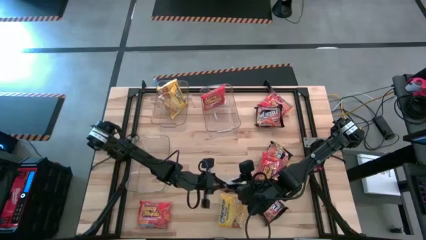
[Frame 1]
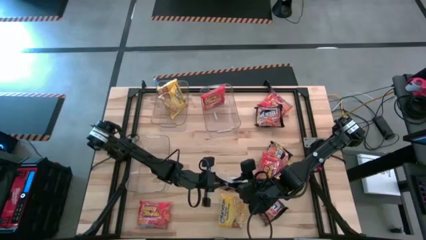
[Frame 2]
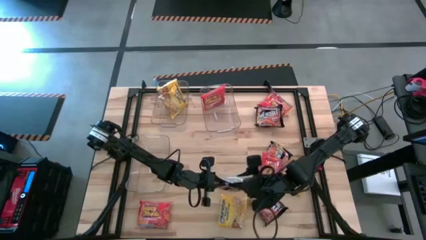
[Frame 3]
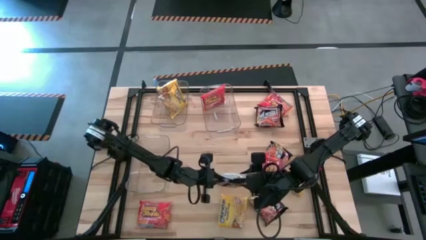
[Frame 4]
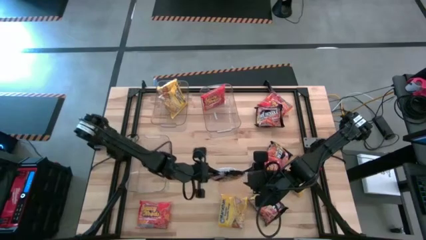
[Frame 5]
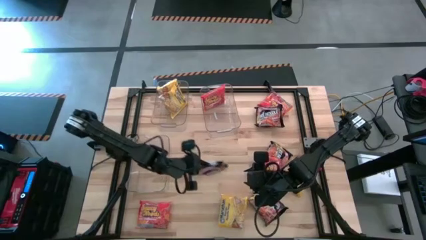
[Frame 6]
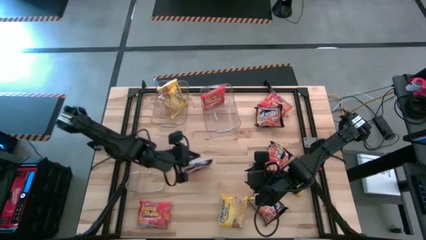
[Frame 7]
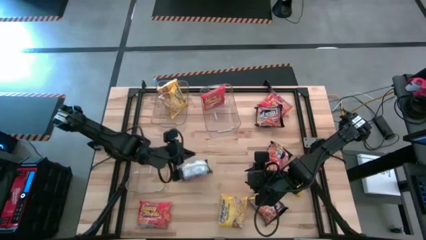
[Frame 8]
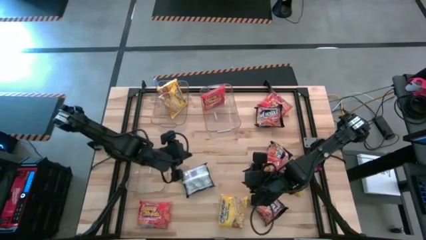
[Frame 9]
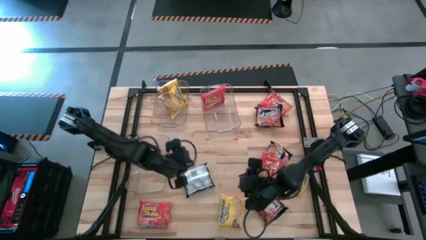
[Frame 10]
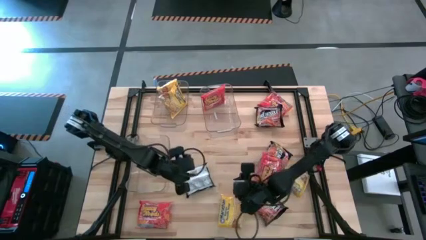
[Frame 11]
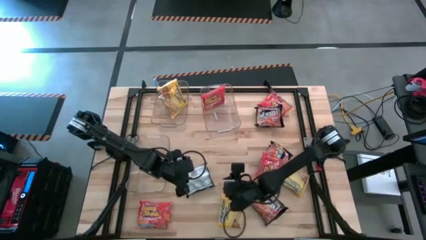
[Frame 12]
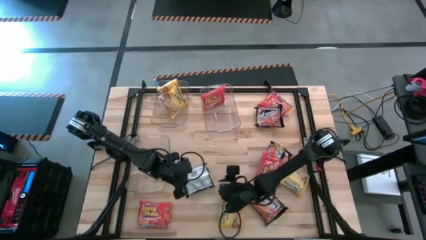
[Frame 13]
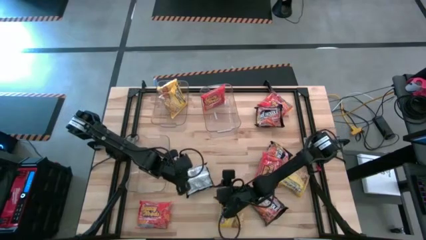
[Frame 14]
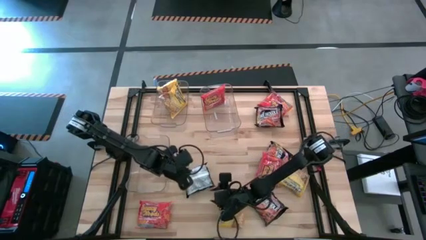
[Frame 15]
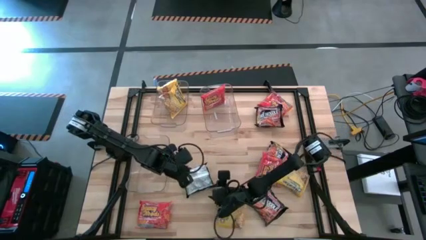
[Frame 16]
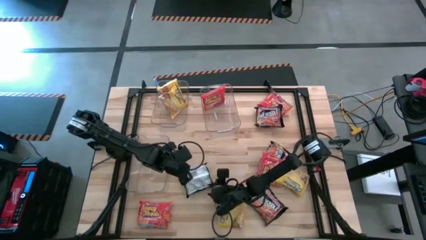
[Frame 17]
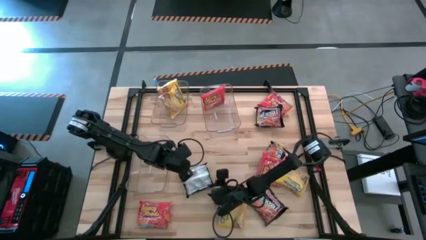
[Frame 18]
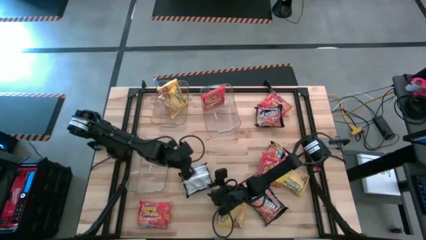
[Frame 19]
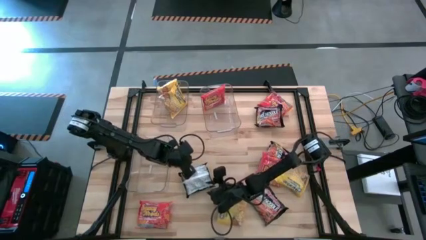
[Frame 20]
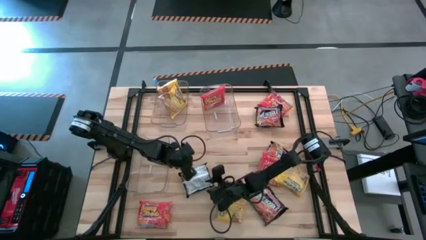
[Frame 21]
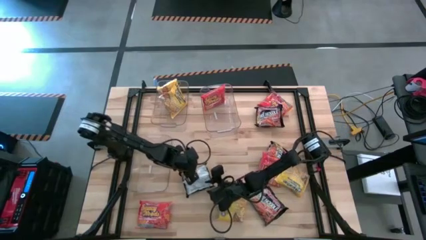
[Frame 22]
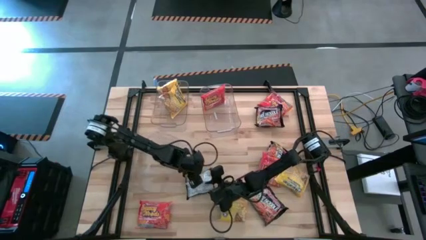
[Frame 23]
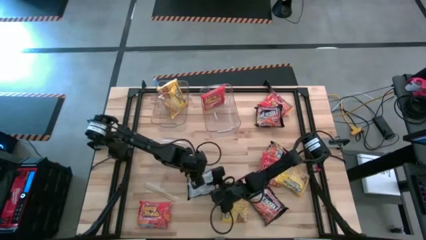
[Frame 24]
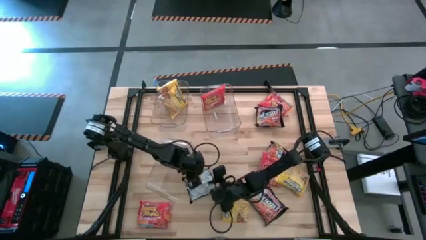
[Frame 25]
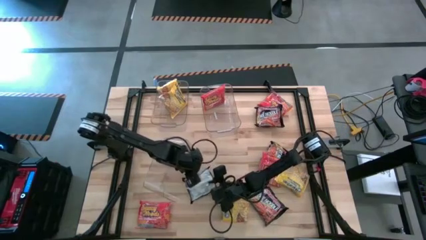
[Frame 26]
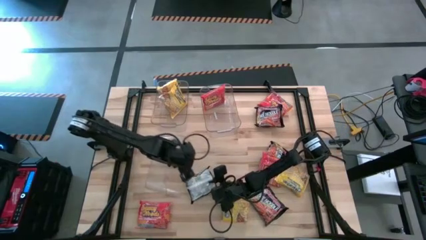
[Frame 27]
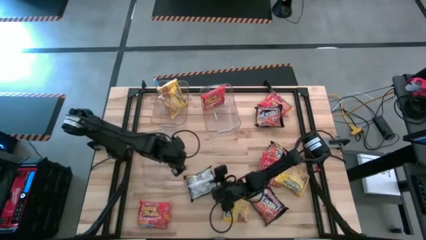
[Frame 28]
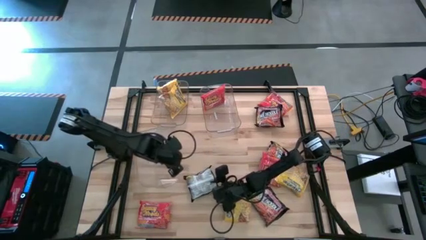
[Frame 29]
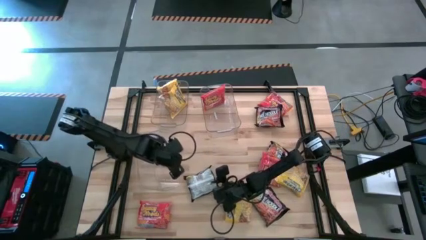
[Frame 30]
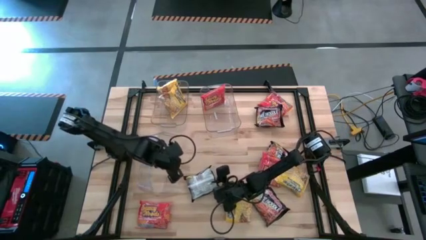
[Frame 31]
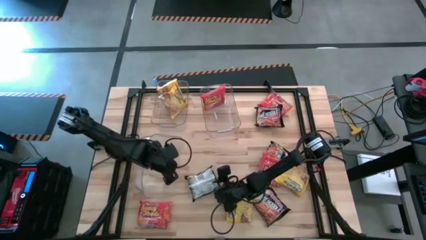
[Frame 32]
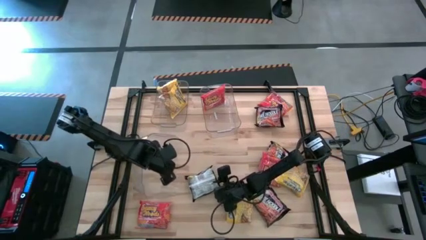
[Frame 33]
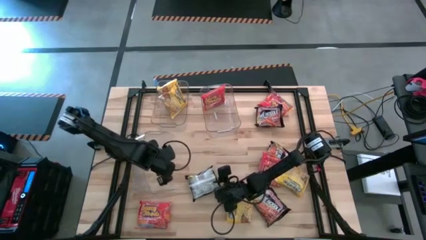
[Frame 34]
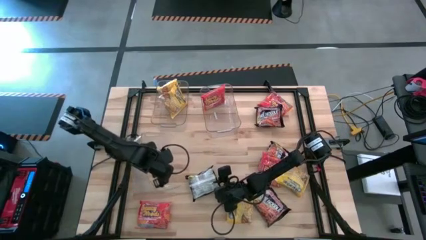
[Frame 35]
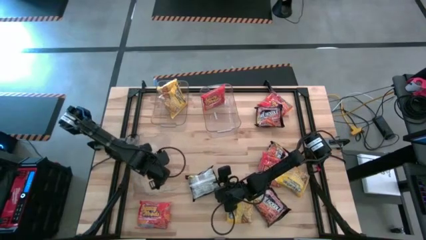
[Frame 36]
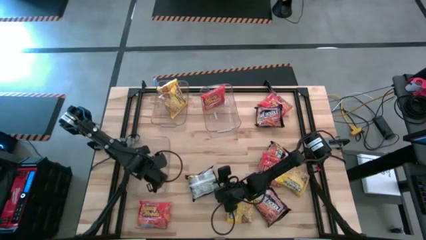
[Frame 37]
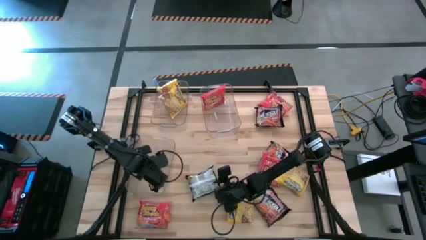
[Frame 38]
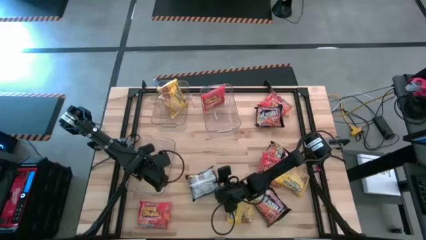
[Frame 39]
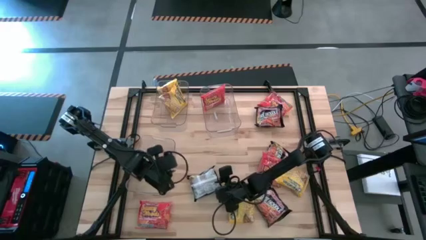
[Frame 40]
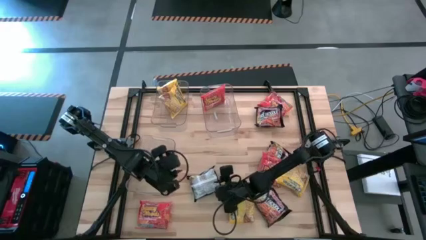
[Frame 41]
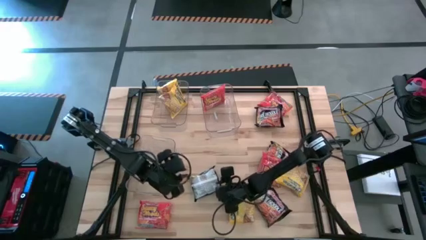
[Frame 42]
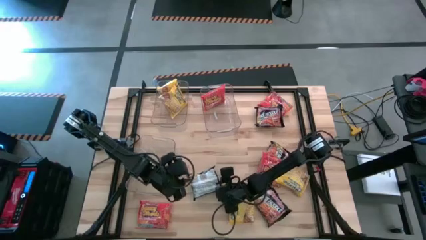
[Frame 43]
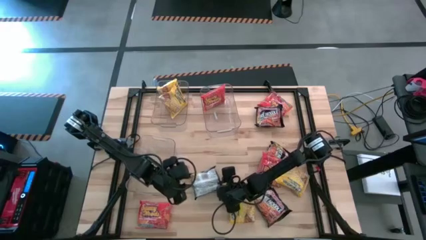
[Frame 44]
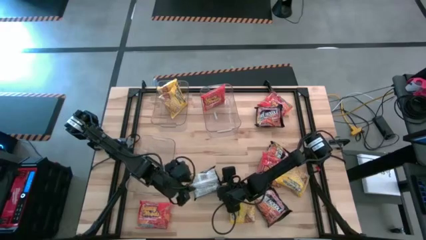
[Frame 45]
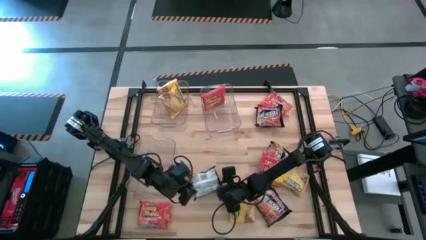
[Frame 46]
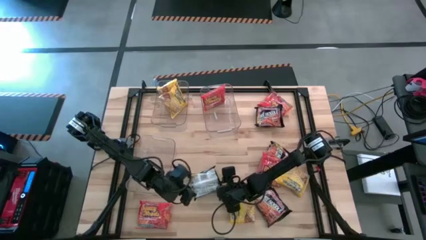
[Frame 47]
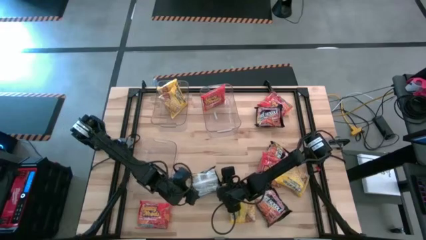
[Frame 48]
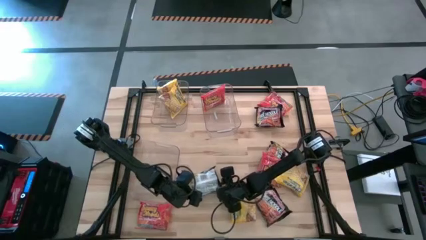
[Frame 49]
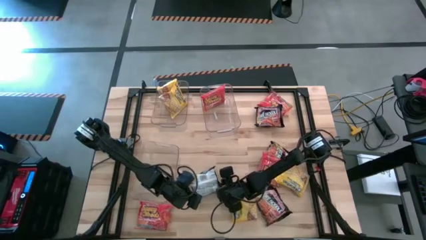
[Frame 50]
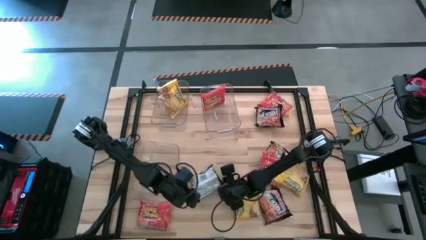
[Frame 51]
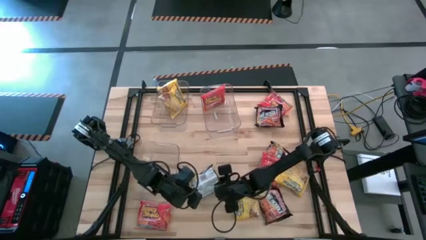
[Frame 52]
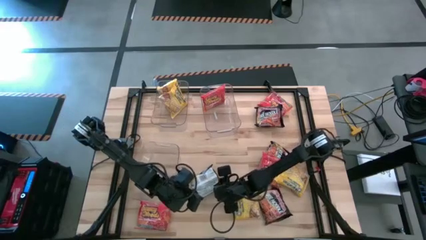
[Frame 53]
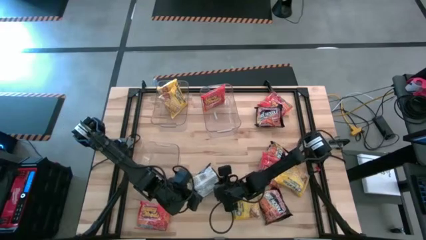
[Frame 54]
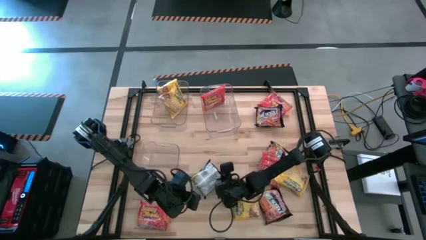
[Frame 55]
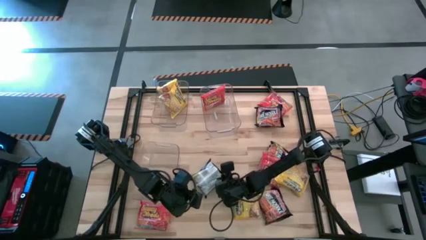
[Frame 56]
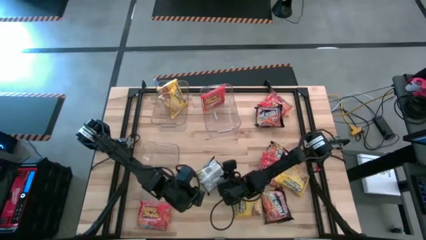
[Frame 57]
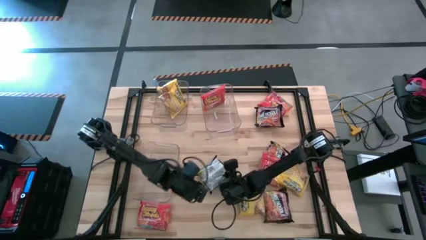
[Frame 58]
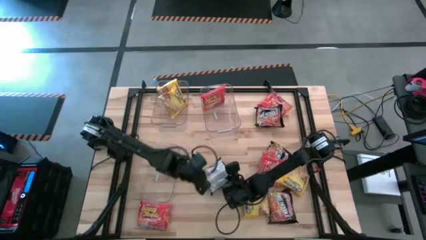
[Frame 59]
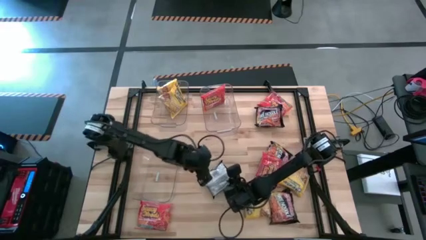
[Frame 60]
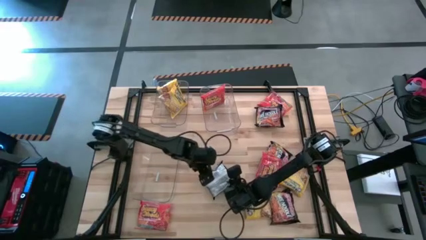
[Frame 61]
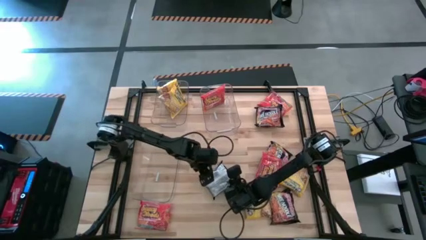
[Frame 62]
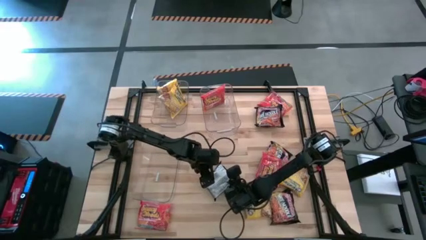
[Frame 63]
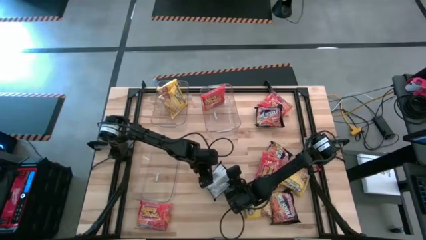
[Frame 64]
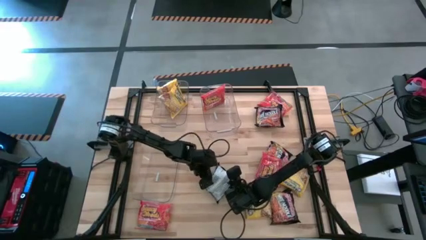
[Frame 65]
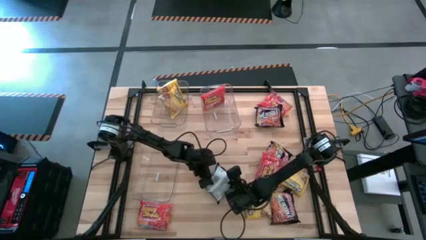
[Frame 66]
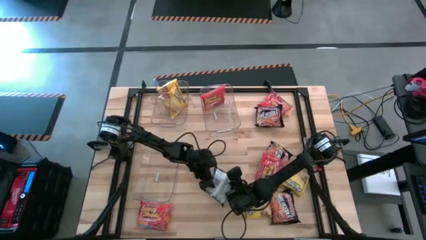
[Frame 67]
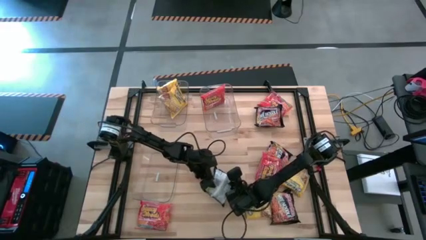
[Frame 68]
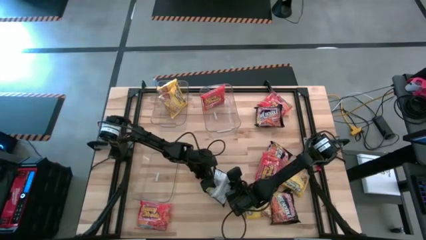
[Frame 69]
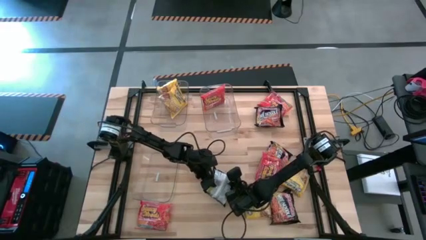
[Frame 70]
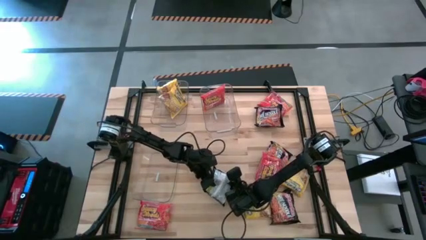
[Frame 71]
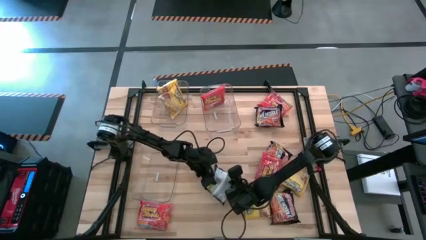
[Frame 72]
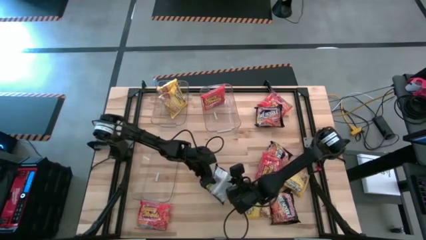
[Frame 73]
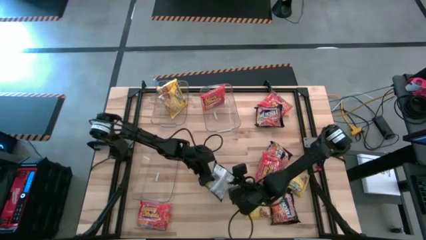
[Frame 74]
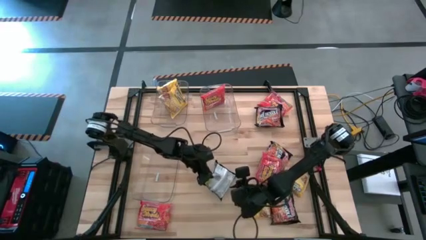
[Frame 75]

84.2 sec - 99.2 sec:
Task: Sort Maruchan noodles
Put the black noodle pack into the bottom transparent bin

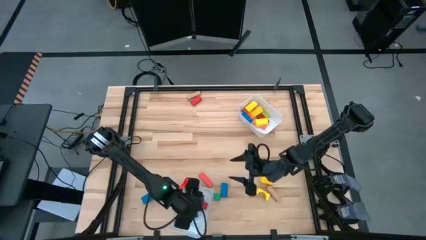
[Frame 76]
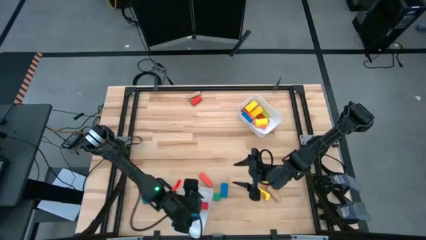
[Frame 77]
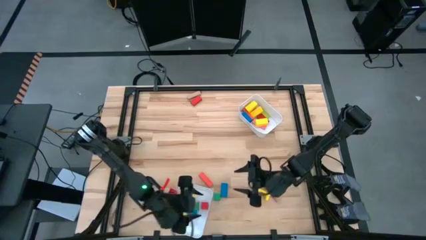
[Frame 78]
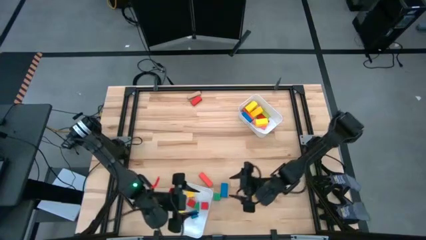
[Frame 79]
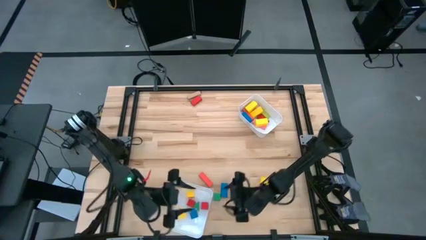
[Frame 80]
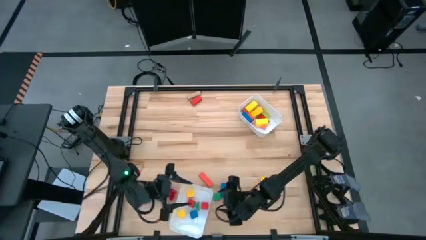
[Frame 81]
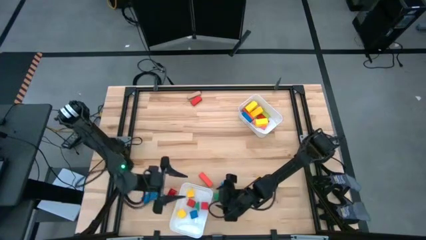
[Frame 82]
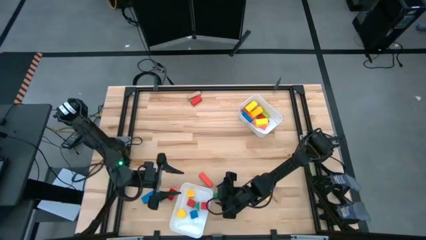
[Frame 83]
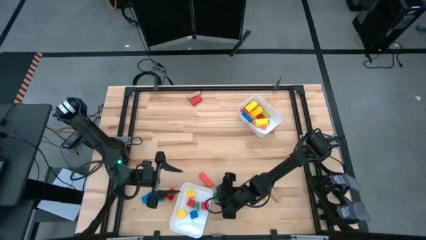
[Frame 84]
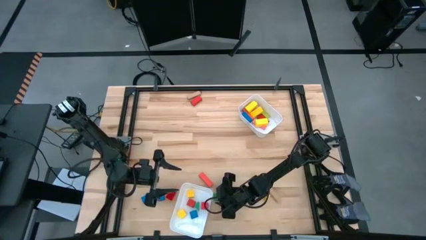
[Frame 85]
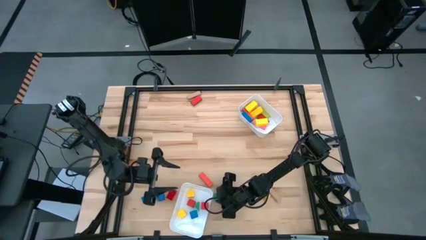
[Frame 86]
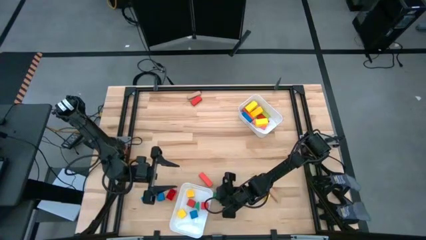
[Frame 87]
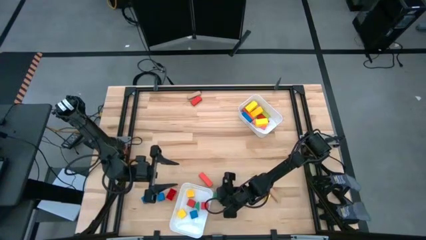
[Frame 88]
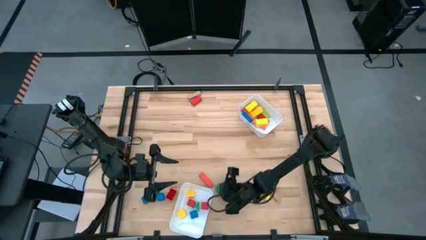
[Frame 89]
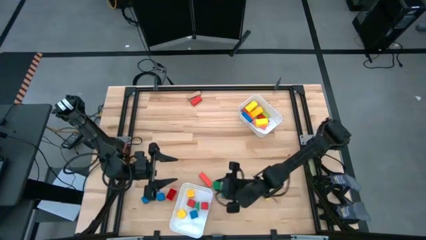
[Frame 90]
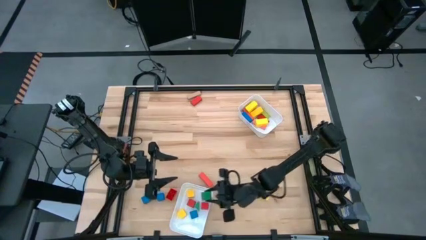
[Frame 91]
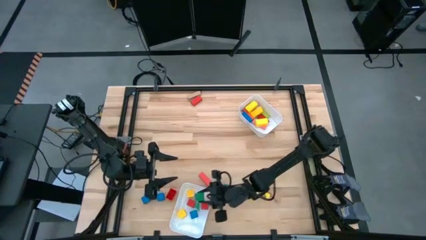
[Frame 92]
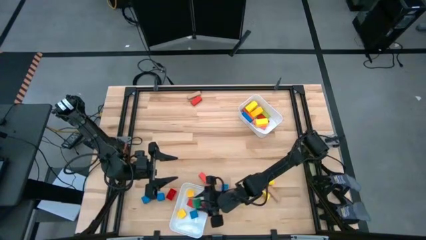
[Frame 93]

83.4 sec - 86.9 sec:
Task: Sort blocks by size
Put the green square block into the bottom white bin
